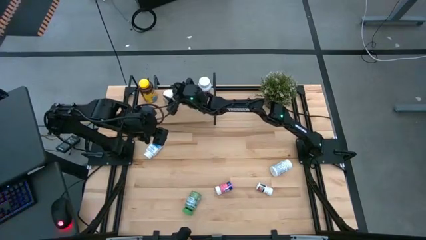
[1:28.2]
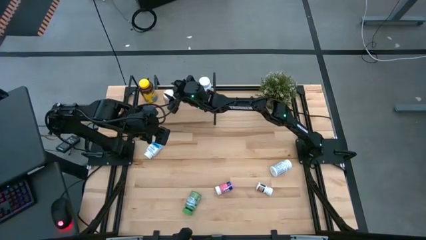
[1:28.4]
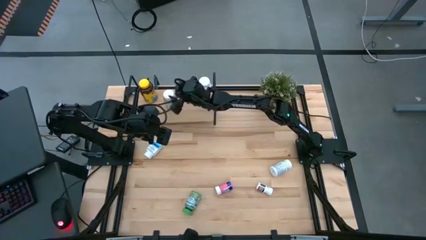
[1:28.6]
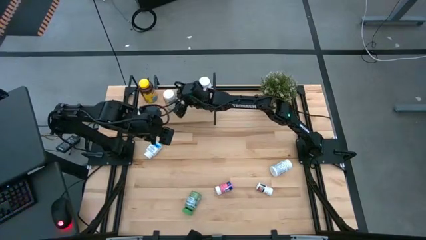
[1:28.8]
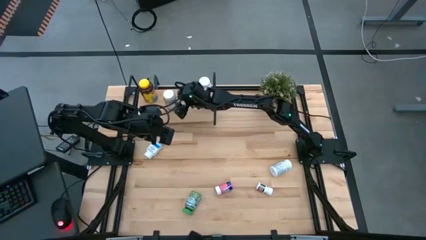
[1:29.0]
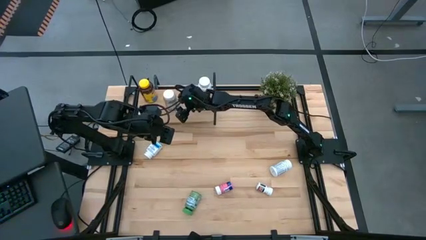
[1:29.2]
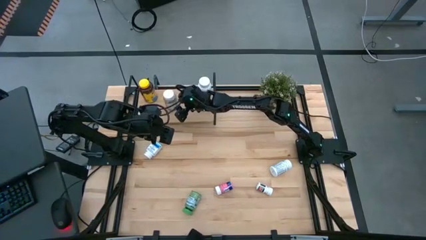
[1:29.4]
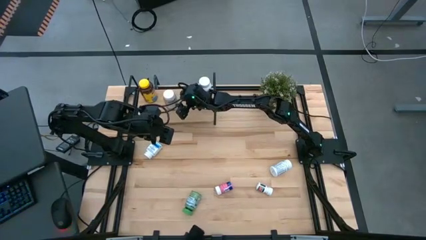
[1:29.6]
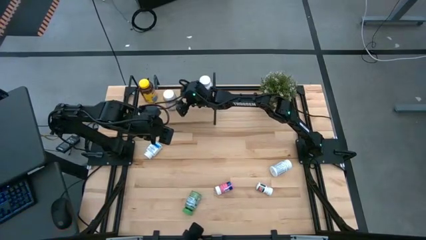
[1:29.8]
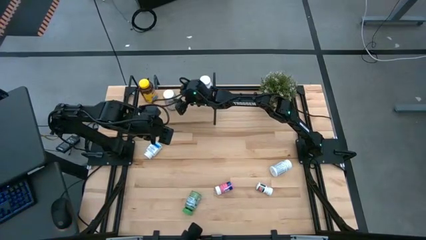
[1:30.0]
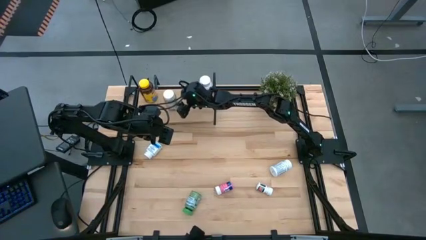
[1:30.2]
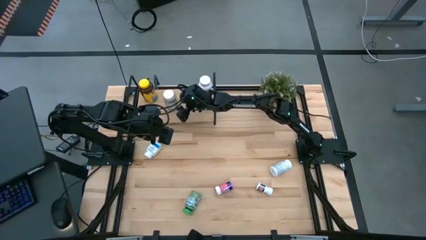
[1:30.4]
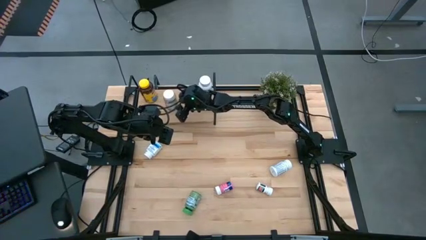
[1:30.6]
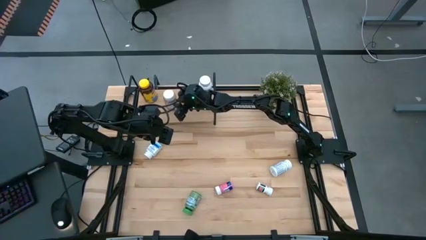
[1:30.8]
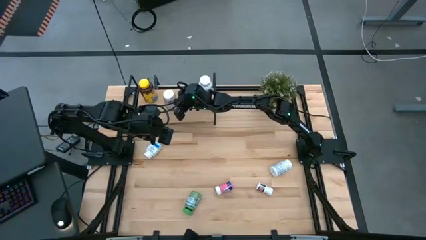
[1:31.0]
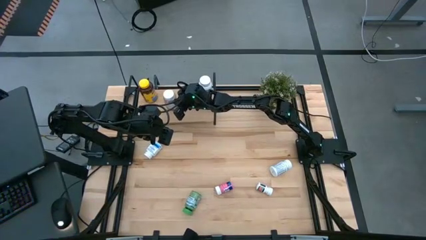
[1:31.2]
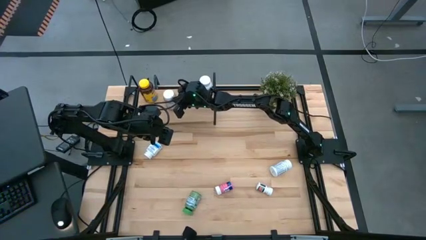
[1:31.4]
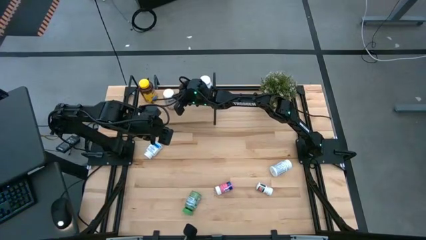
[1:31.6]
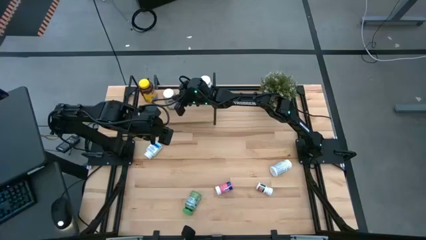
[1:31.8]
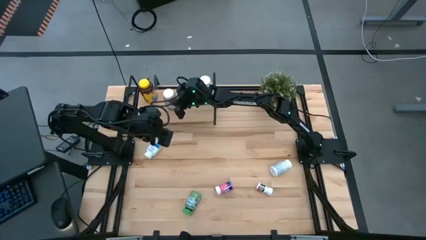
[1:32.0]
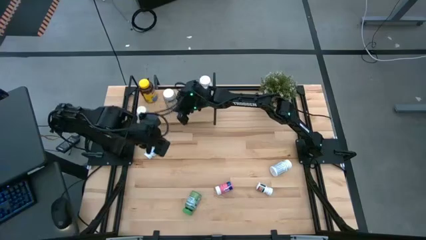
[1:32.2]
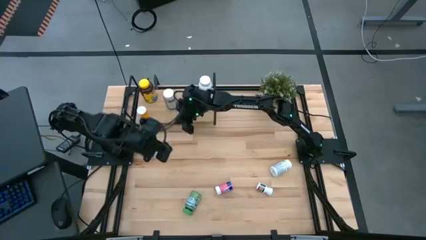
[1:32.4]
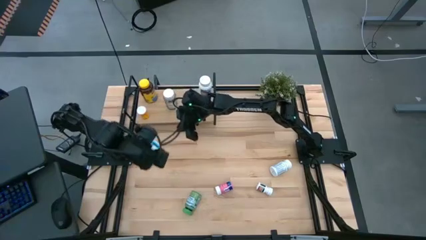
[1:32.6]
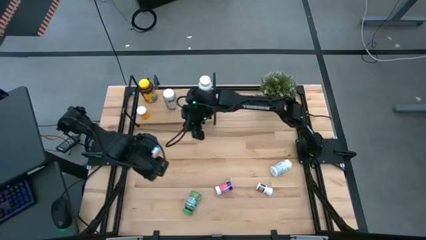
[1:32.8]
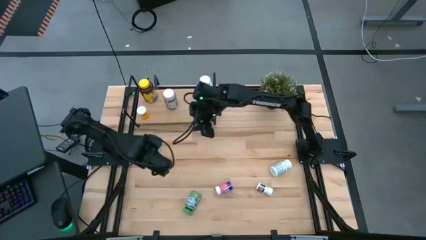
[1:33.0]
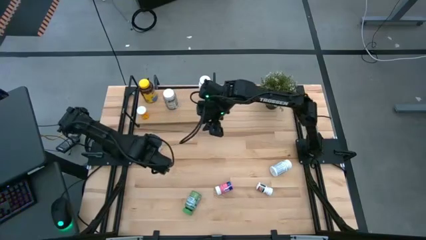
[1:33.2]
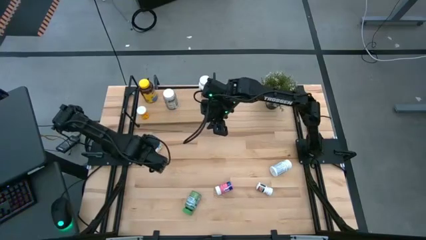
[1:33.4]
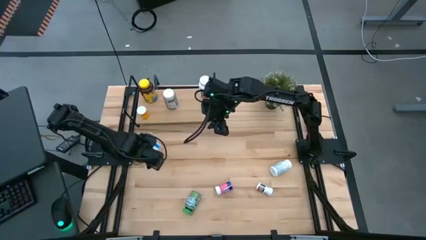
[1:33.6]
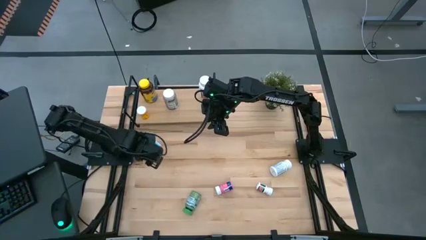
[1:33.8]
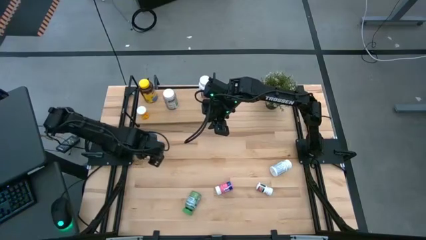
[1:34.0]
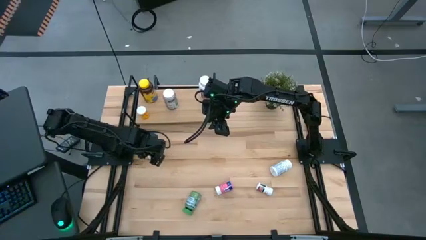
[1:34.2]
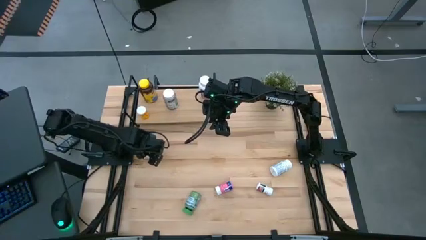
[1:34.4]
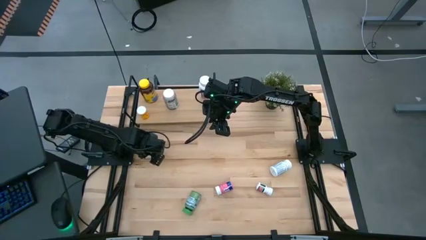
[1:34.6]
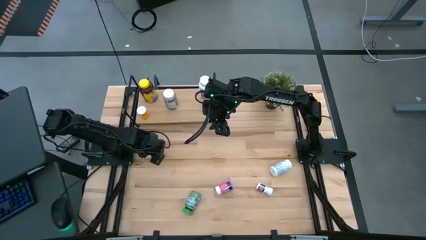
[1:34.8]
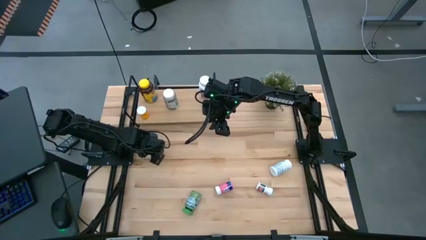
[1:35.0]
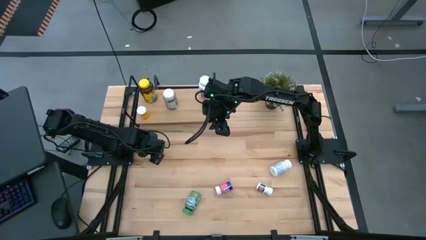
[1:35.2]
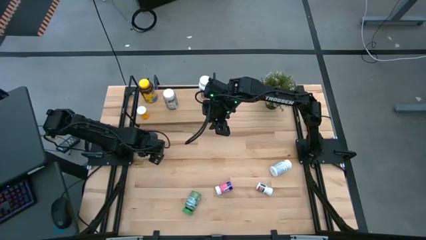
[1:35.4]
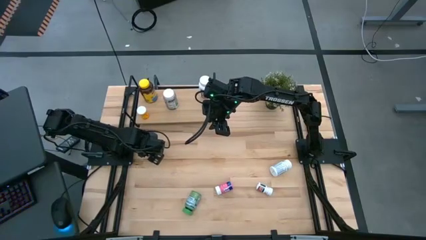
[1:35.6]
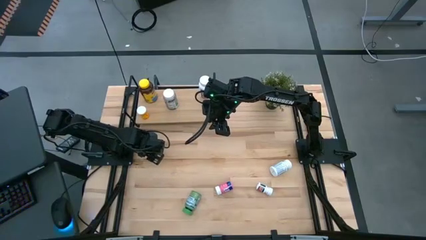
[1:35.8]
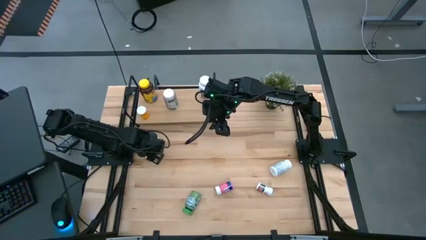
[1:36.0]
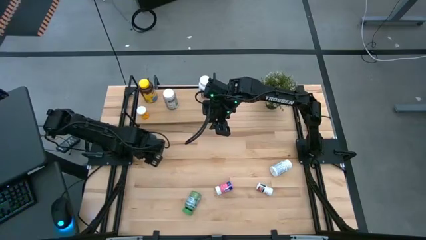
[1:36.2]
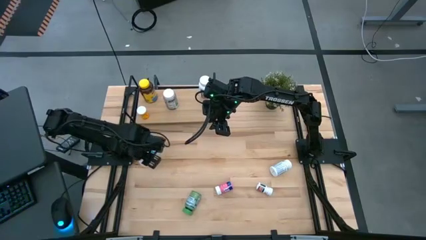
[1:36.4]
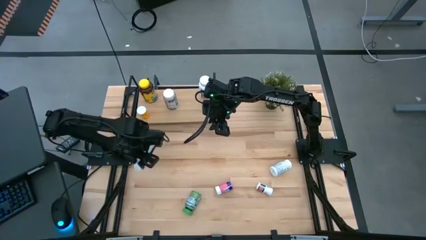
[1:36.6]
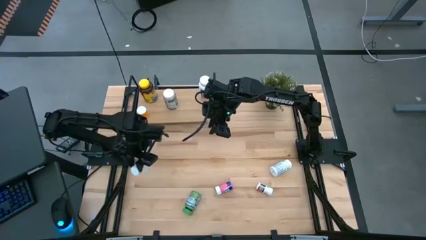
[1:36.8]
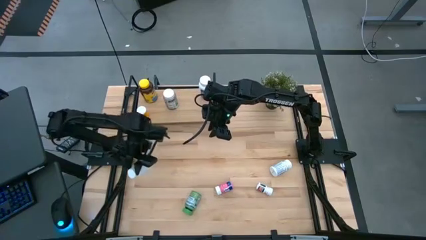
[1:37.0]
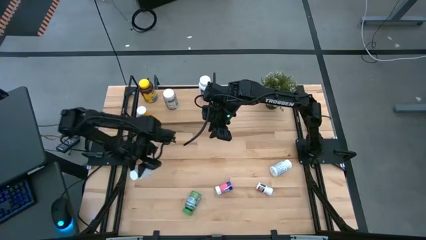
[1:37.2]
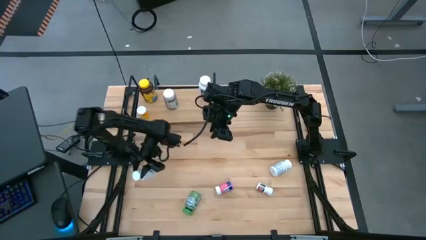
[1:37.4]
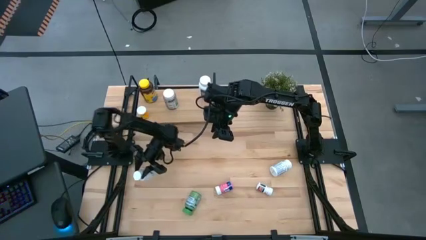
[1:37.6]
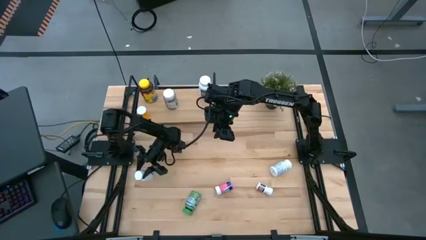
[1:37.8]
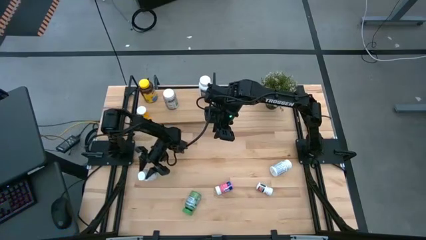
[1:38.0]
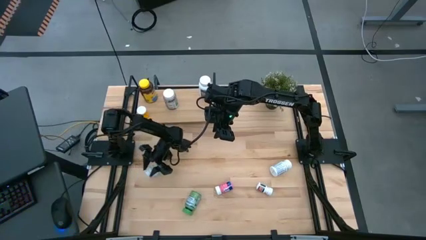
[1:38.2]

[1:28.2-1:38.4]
Task: Pick and place medicine bottles onto shelf by color
Put the blue medicine bottle on the shelf

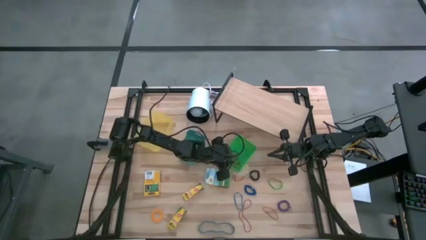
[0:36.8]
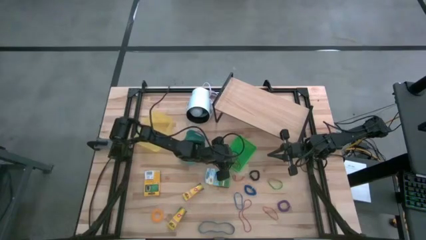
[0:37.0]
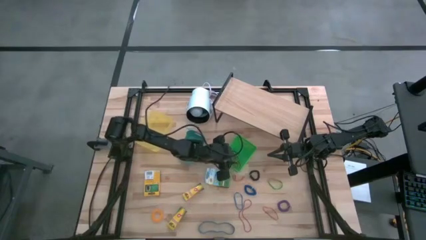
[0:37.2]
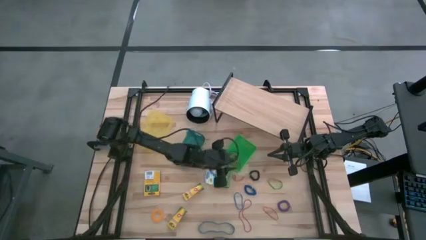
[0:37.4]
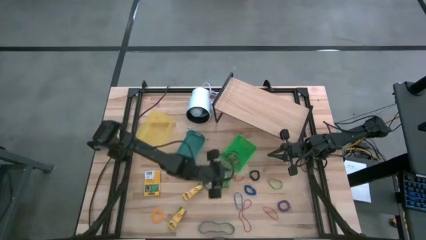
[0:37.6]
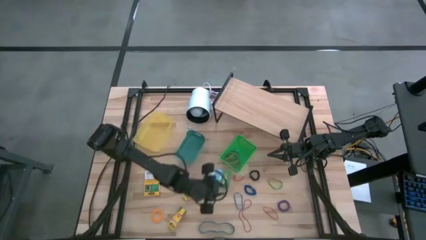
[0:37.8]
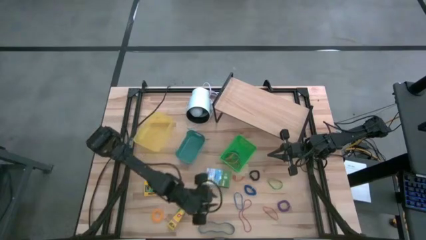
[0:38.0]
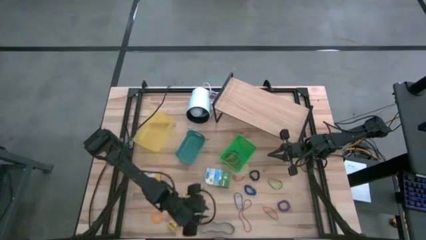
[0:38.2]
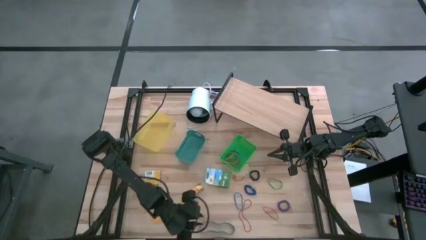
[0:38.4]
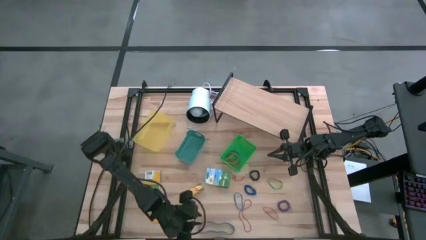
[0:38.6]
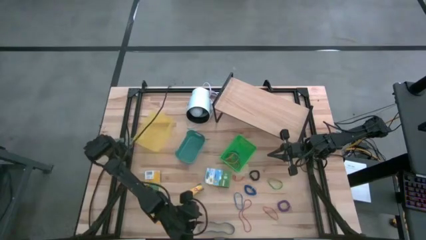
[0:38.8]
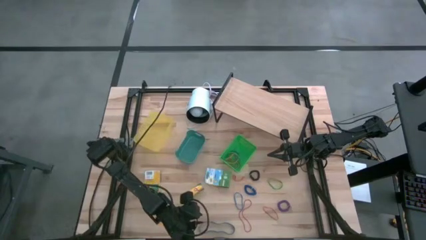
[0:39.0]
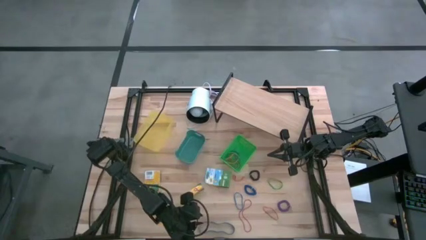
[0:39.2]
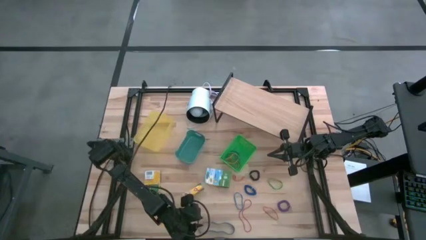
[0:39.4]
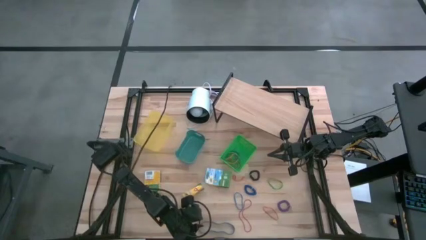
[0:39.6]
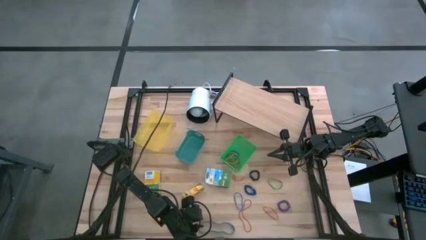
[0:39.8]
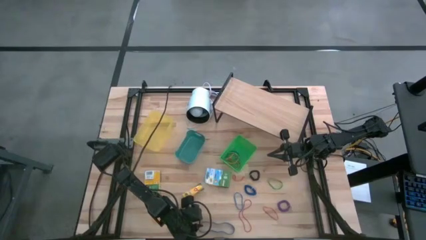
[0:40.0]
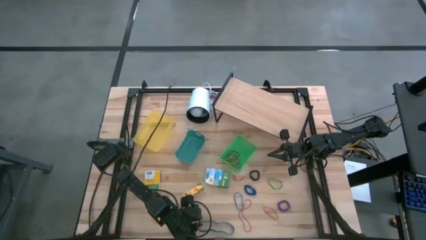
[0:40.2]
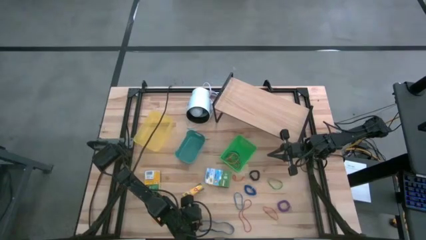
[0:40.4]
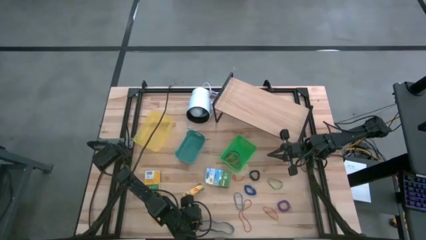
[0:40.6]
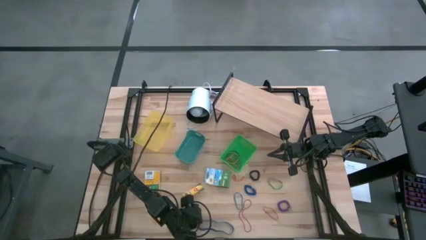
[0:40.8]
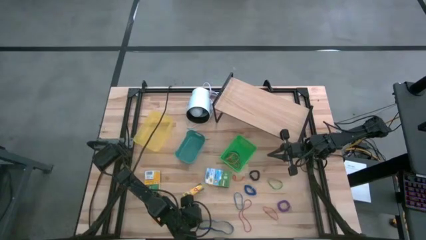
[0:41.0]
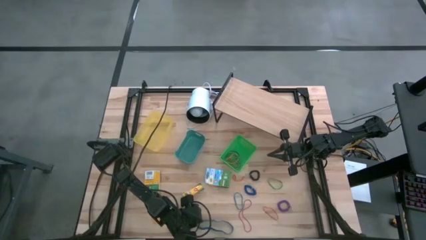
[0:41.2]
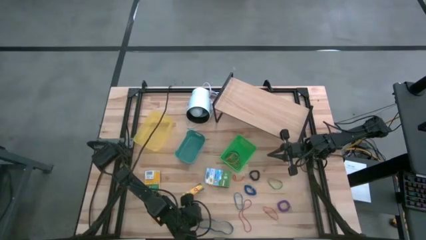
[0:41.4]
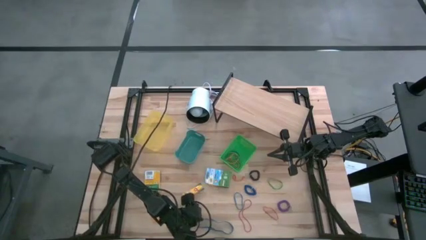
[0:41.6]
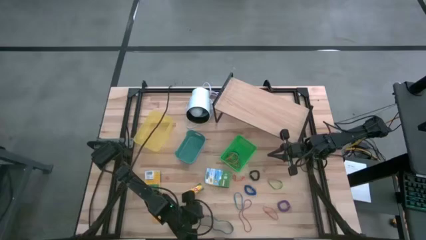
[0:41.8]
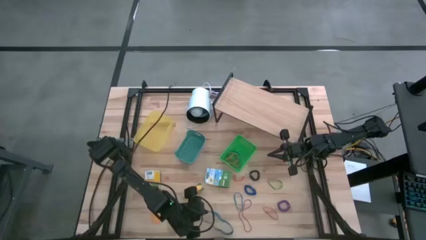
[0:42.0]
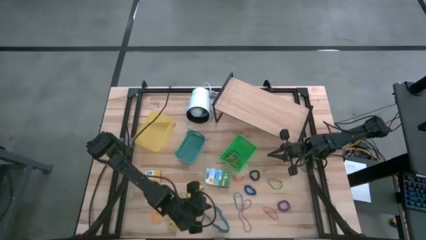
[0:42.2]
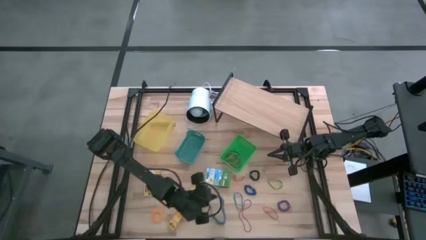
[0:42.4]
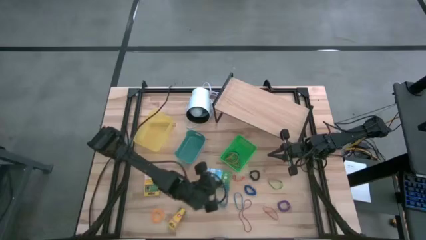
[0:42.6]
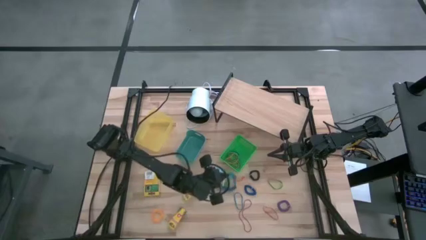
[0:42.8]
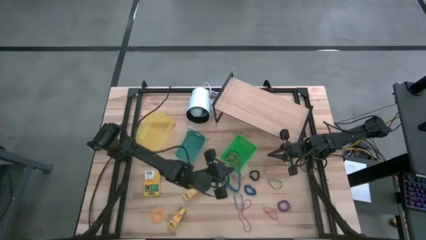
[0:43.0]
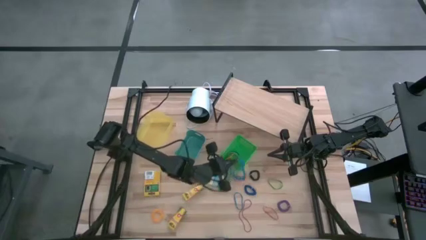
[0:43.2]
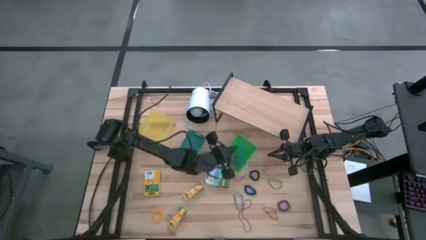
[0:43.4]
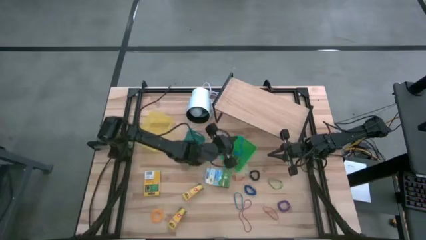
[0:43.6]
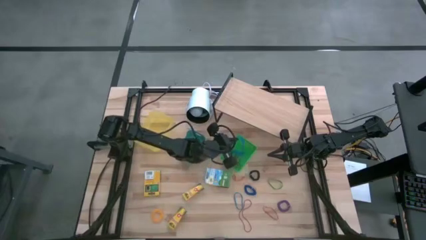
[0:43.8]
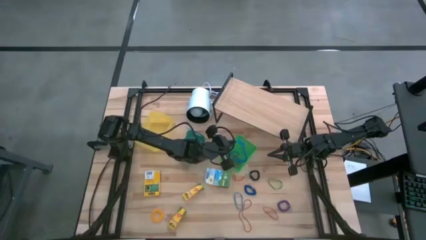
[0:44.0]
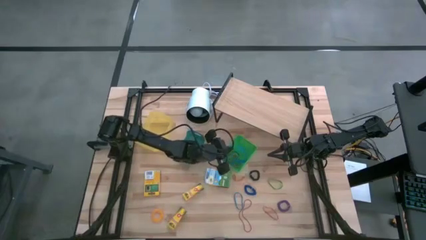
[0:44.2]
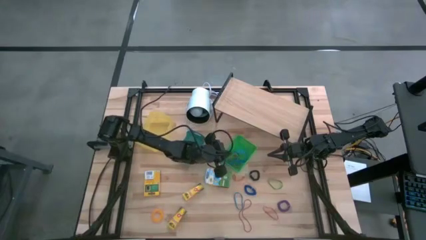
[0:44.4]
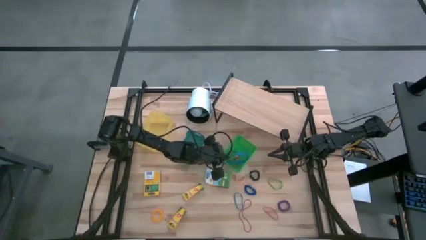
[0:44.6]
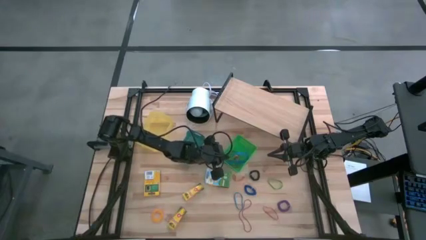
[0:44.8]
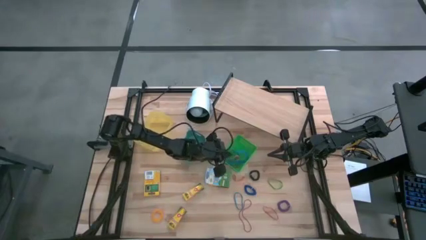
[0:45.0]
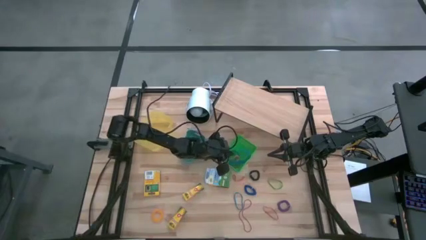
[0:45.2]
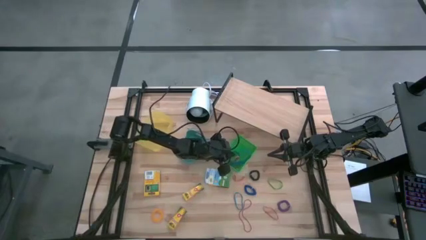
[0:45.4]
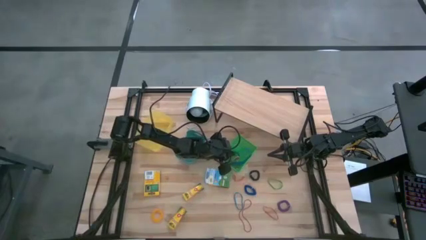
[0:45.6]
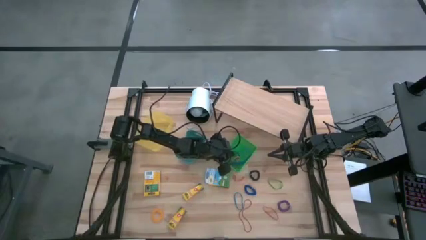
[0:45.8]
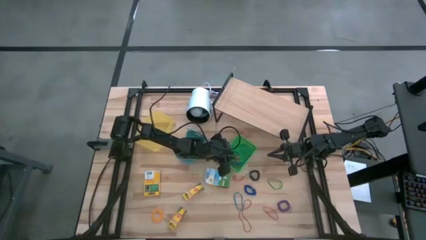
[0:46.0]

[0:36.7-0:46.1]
Task: Pick & Place Office Desk Supplies
Put the bottom left blue rubber band into the green bin
